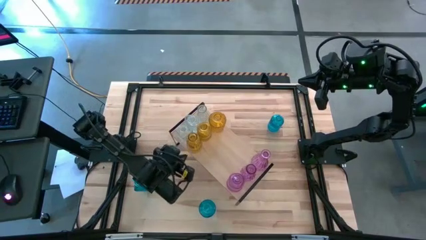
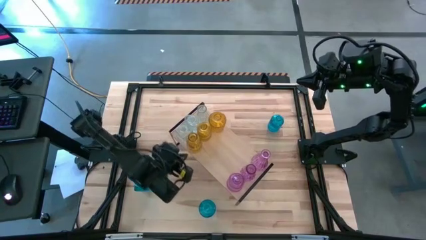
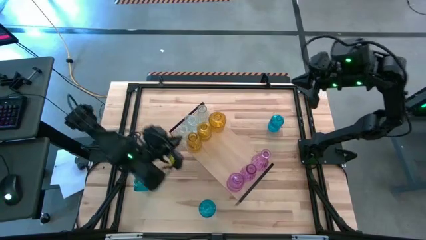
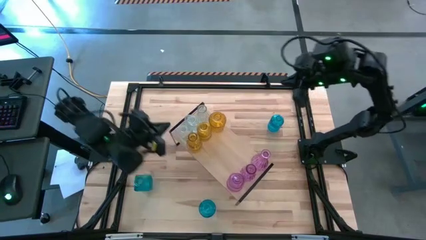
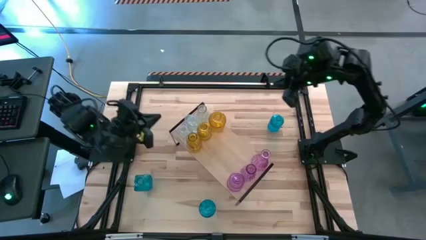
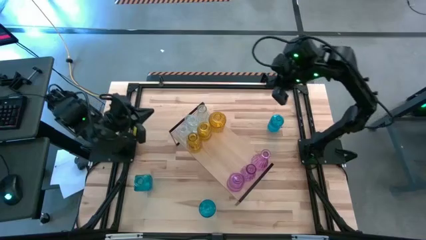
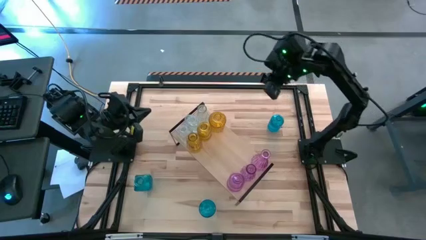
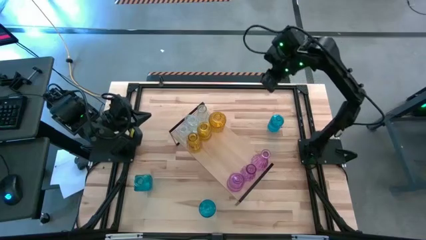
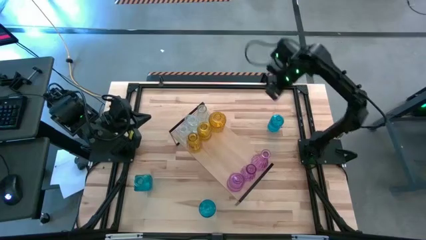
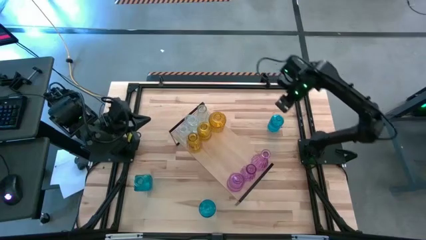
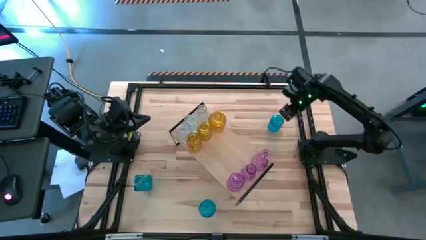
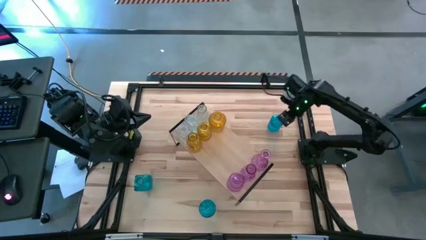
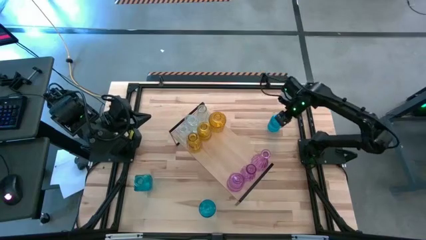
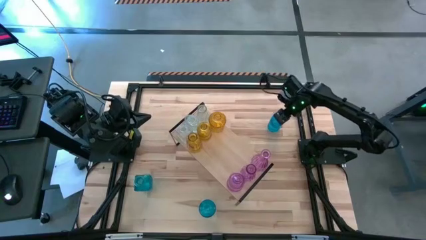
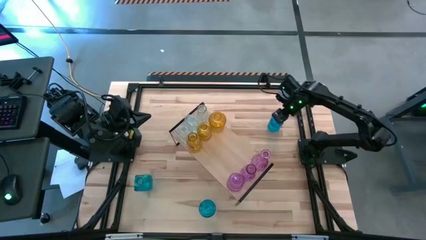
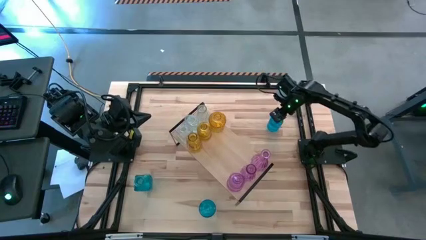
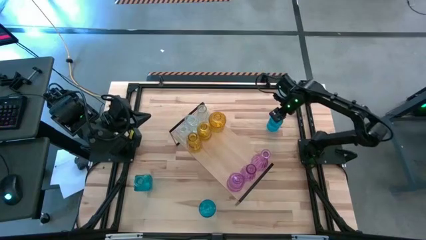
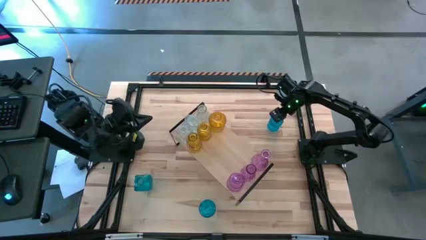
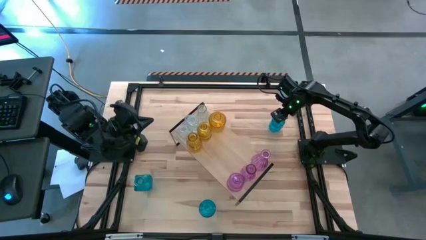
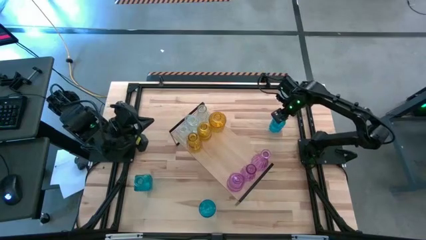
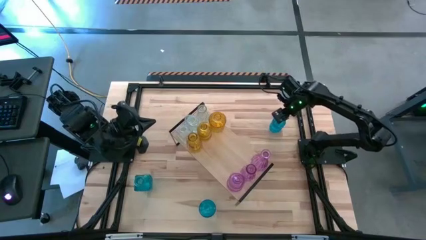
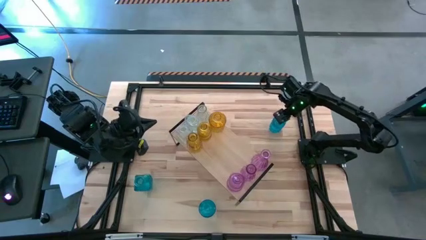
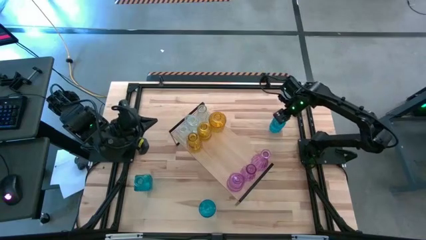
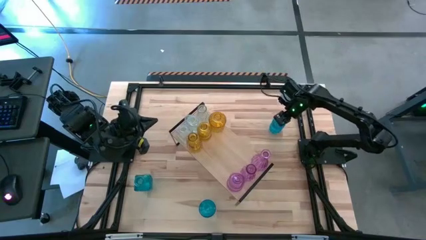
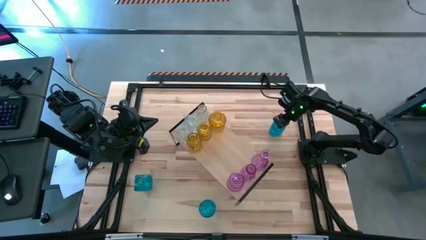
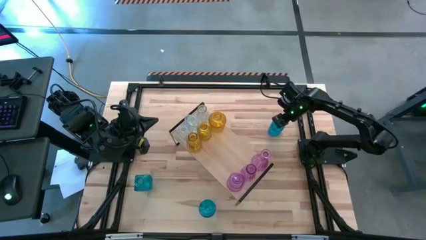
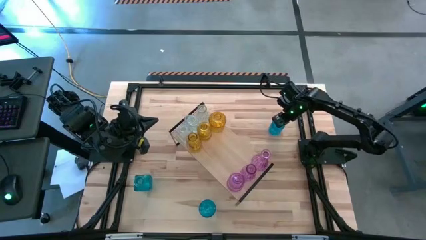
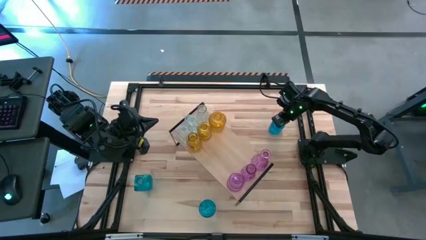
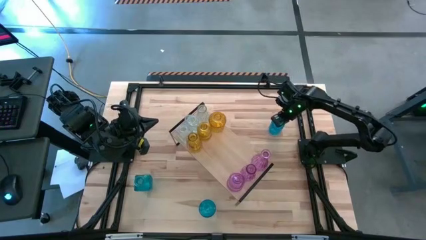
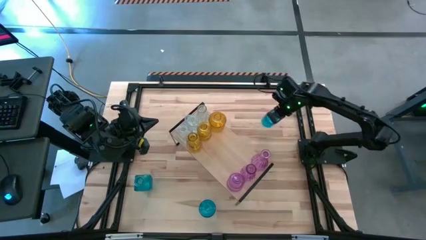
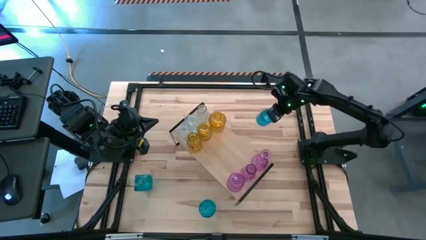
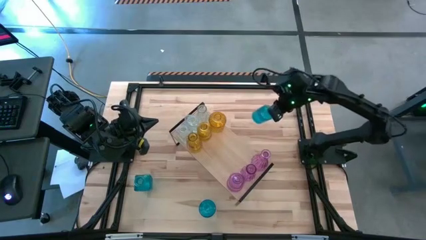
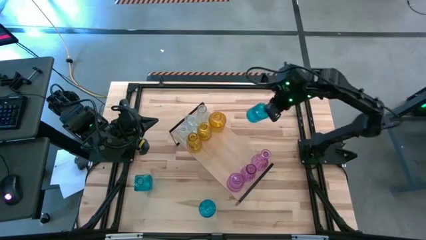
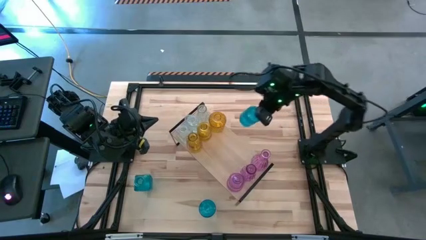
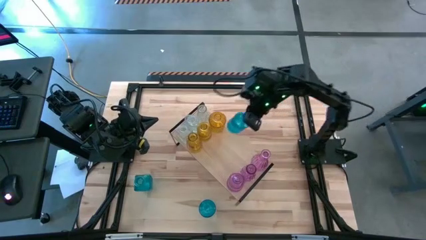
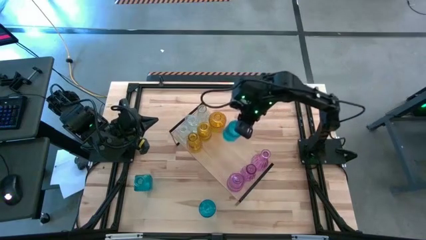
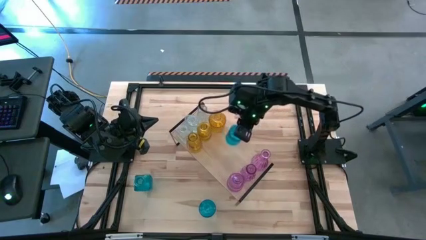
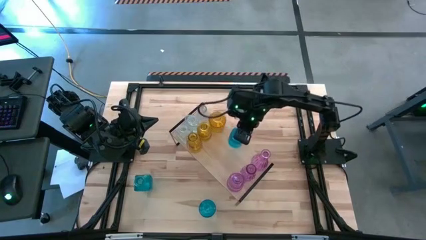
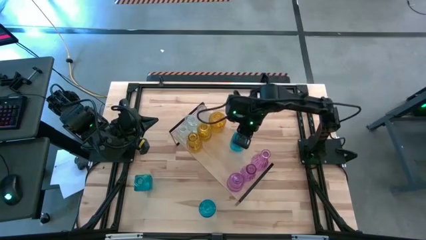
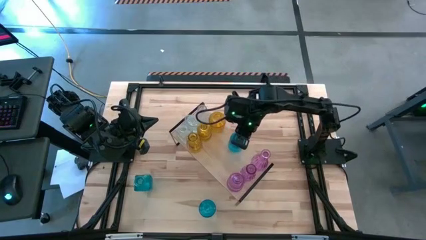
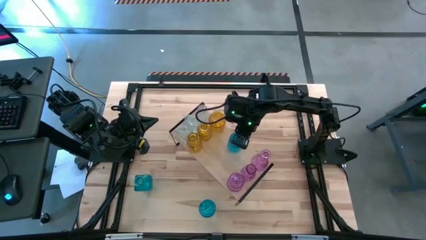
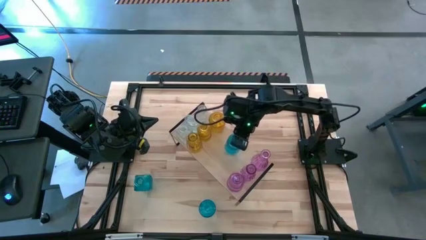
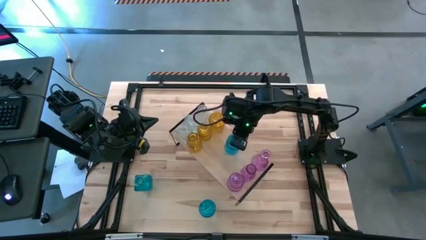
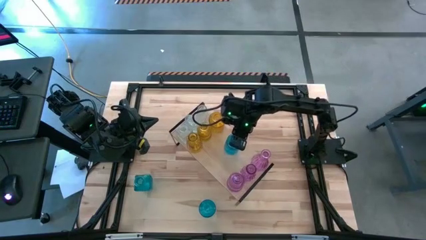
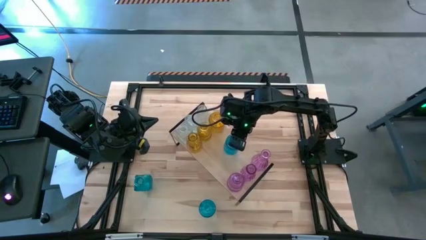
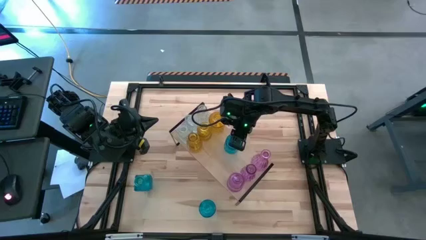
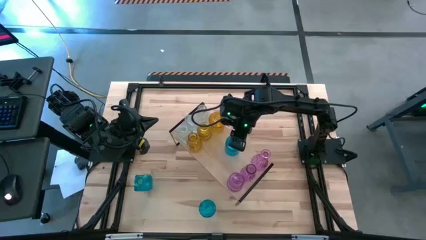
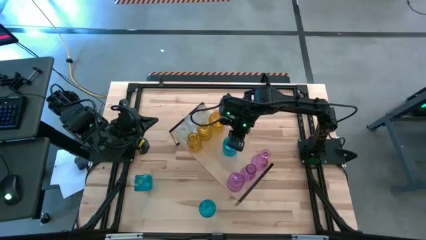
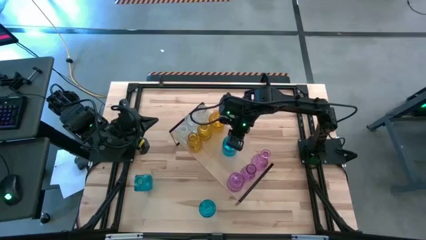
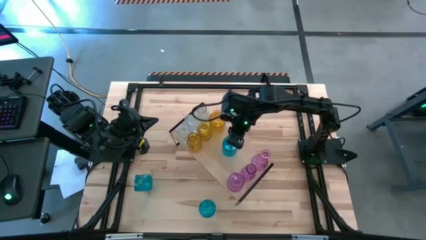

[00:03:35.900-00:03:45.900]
Task: sort vases onto shelf
Put the top blue flower vase on the shelf

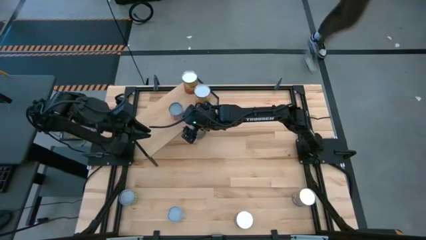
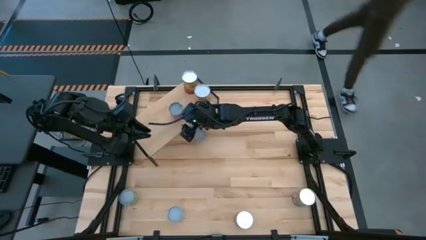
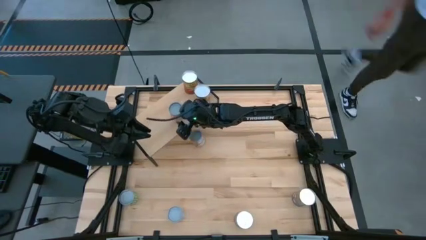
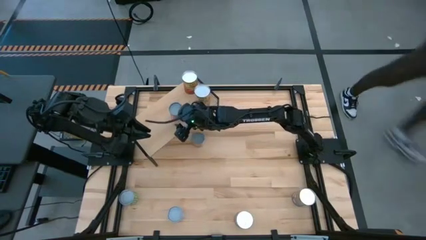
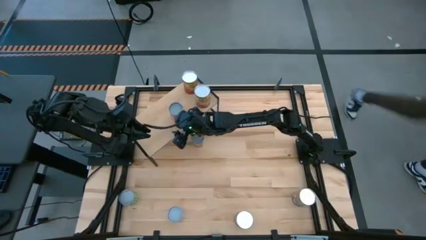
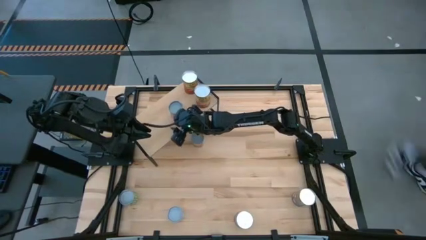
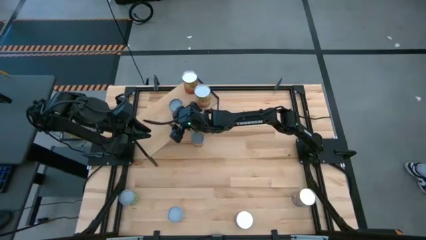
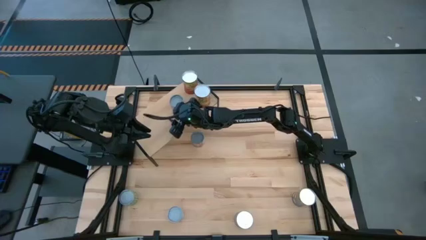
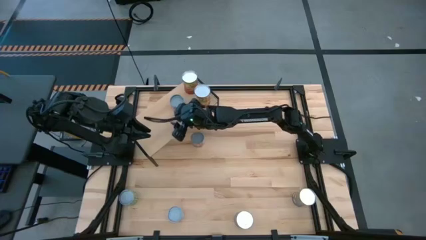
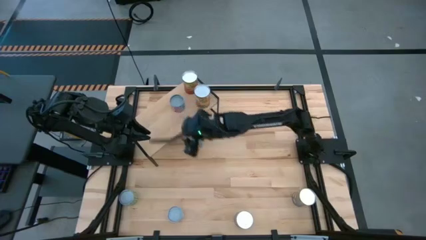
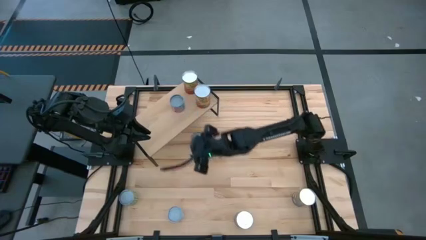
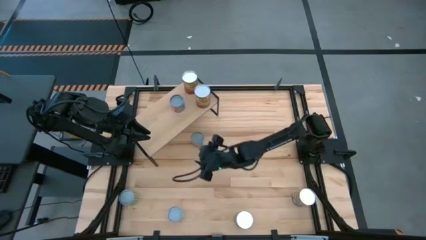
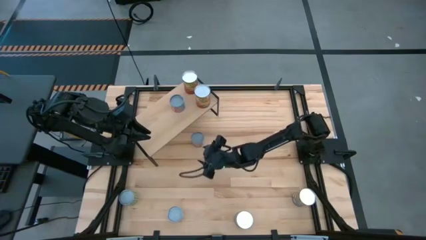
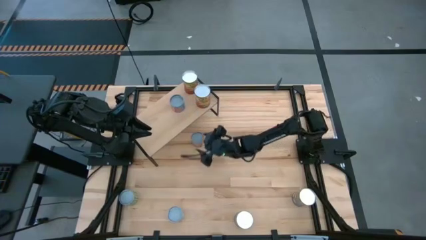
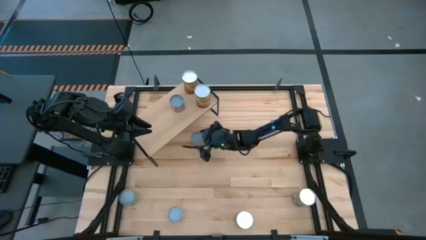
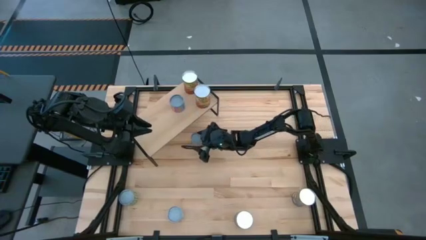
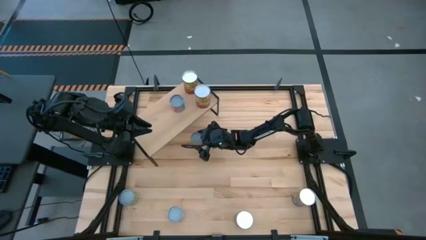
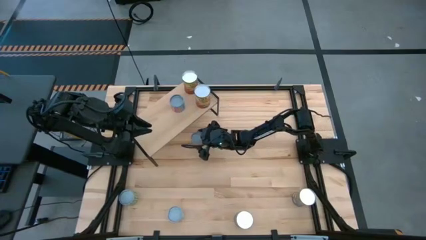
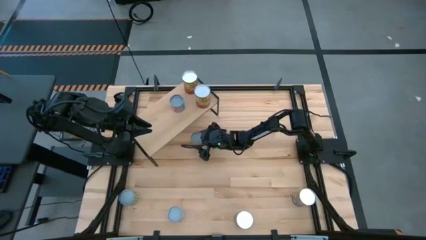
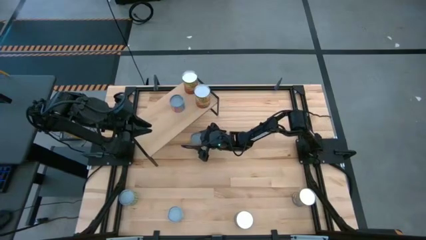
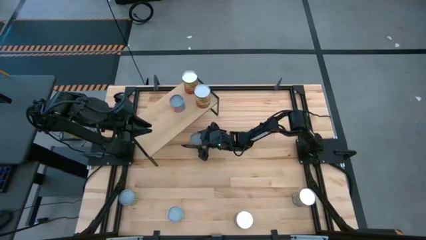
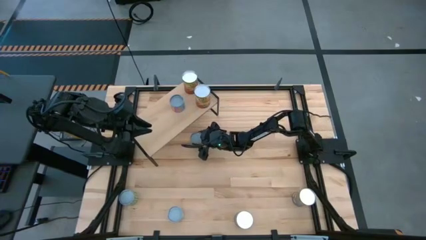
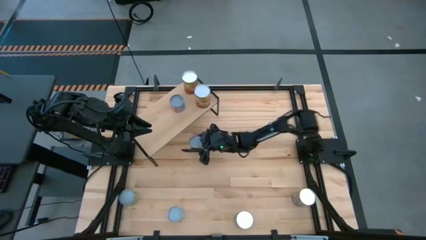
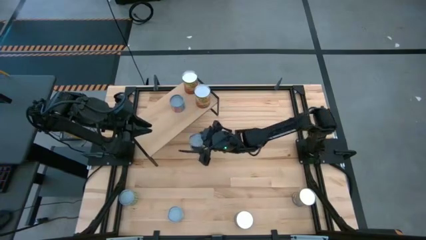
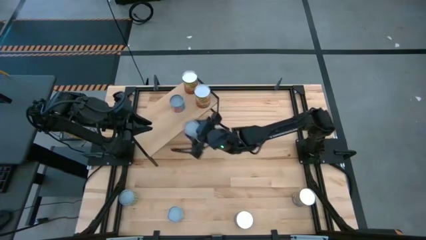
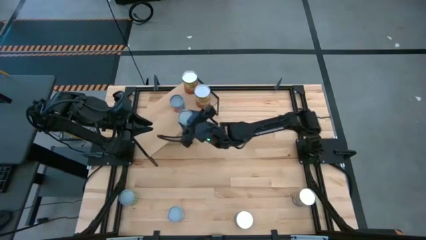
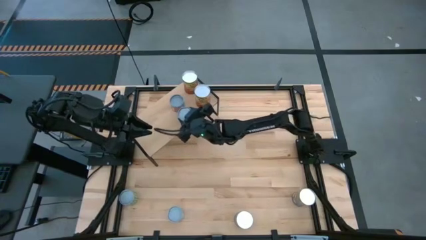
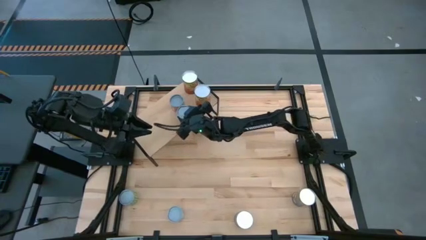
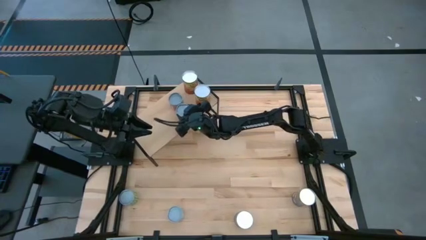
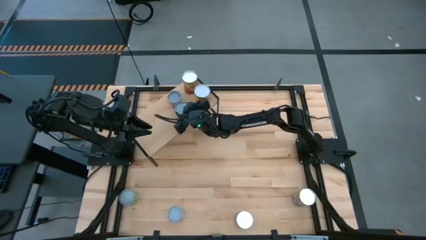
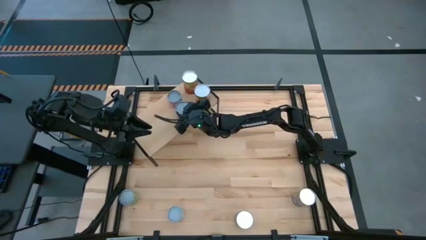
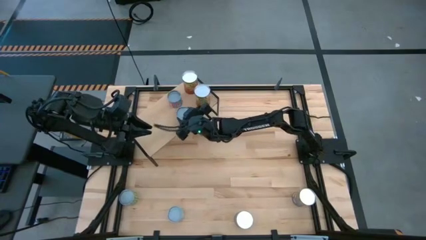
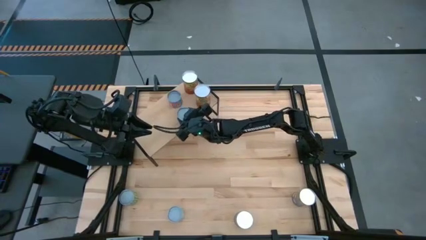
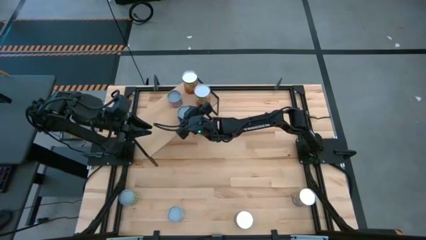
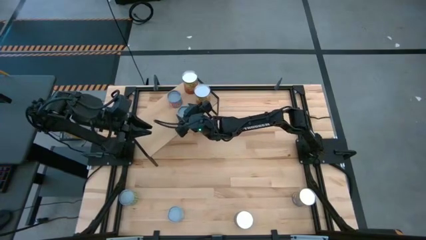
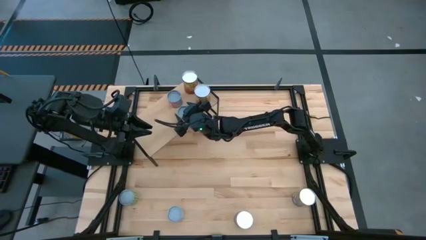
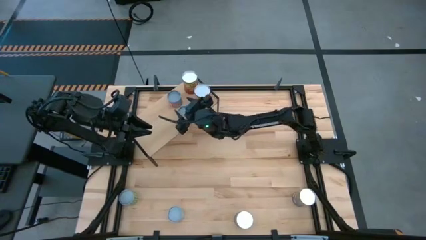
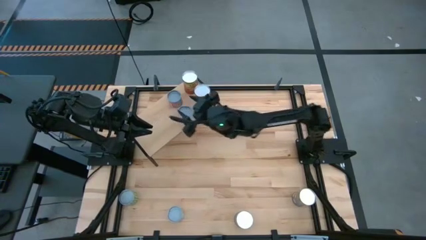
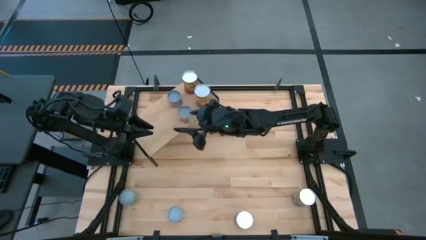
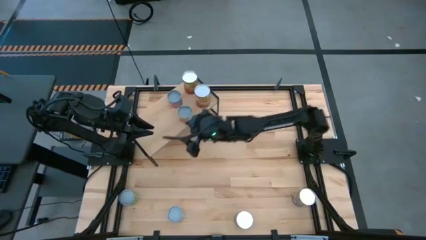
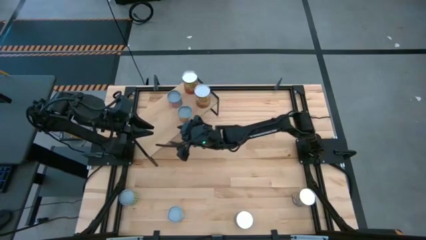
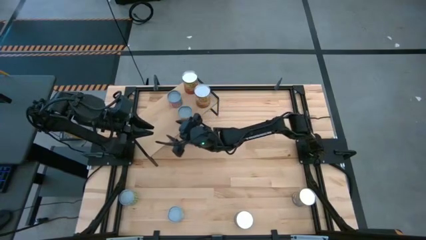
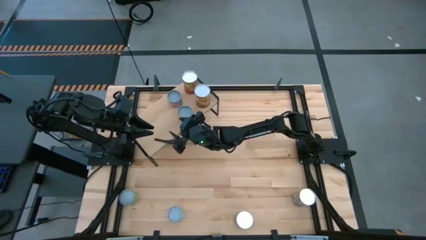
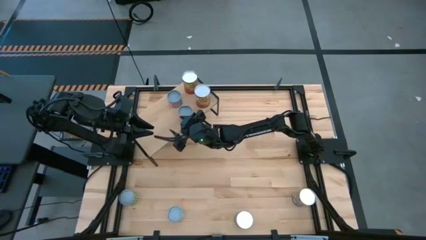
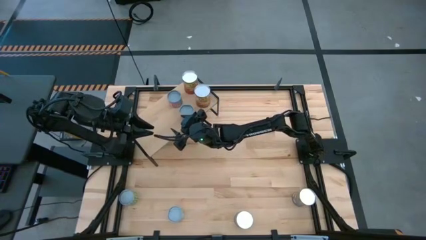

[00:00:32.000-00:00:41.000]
Task: Pick and place cans onto a shelf
Put the canned oranges on the shelf
